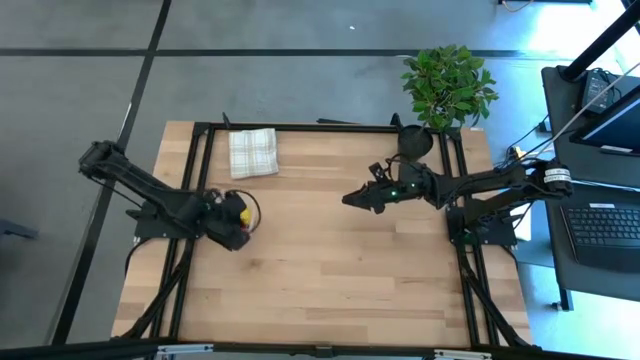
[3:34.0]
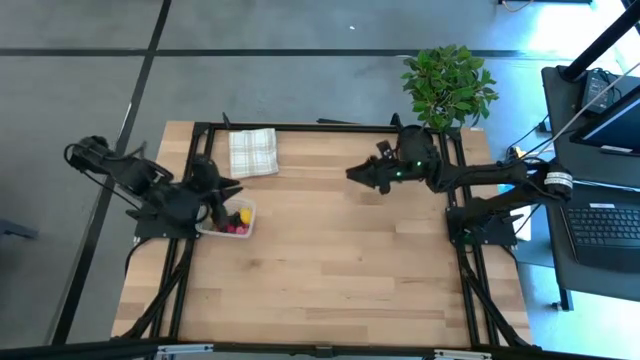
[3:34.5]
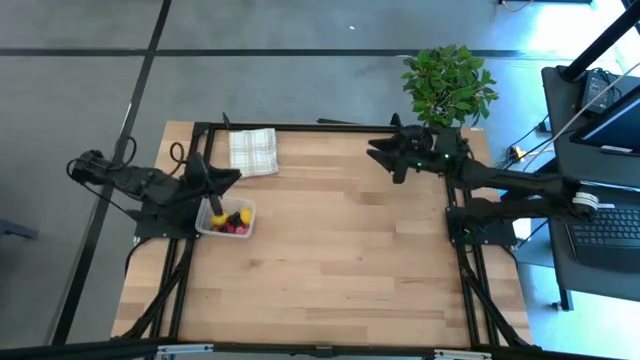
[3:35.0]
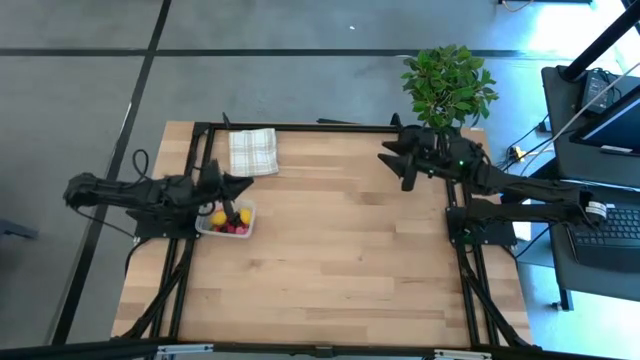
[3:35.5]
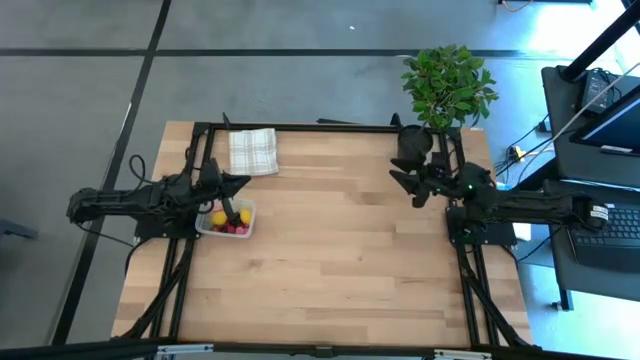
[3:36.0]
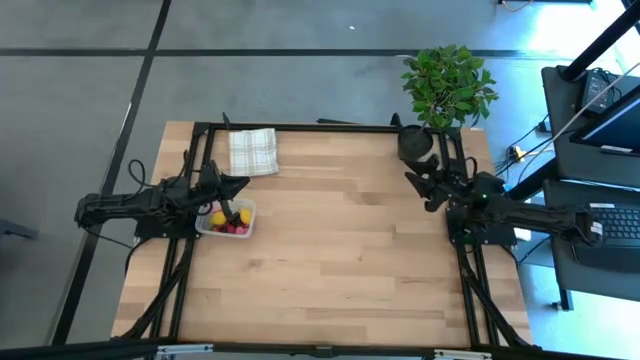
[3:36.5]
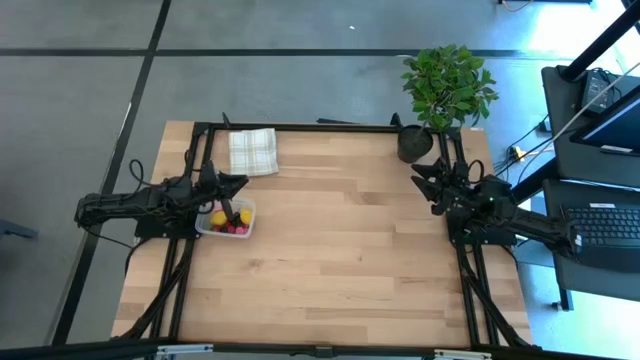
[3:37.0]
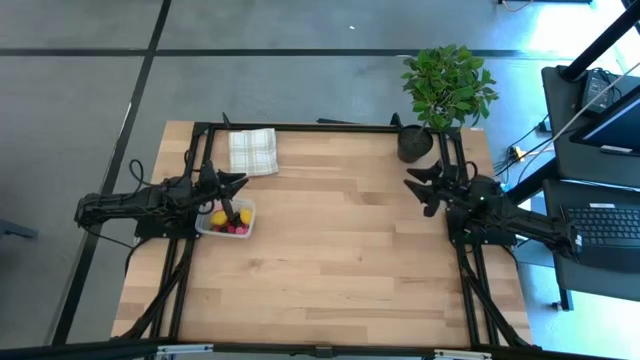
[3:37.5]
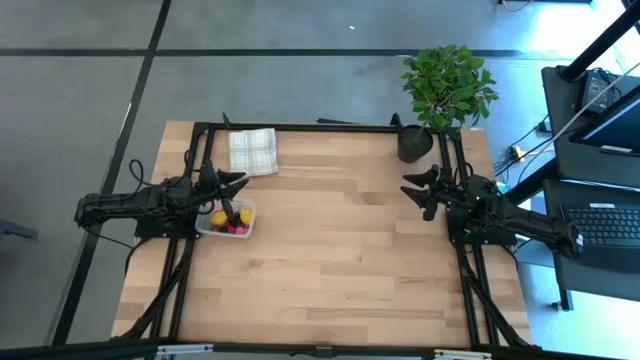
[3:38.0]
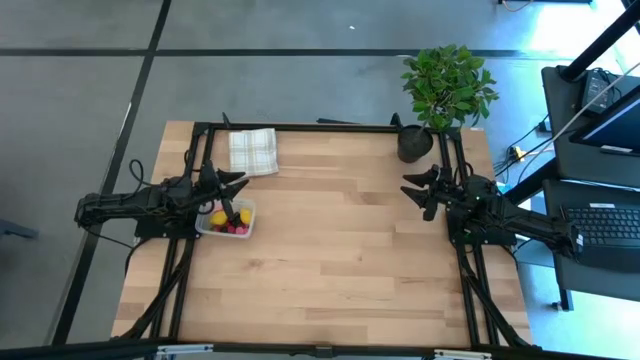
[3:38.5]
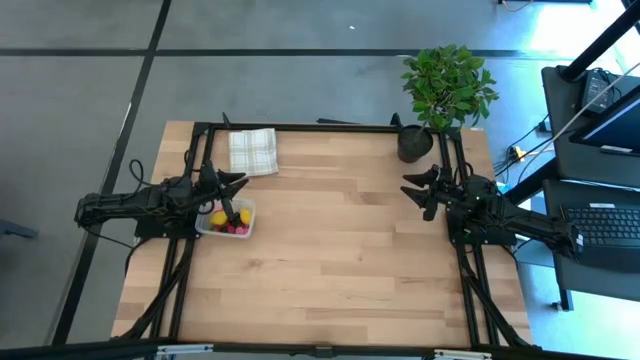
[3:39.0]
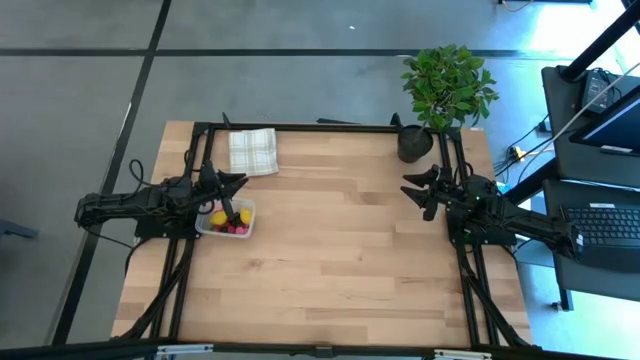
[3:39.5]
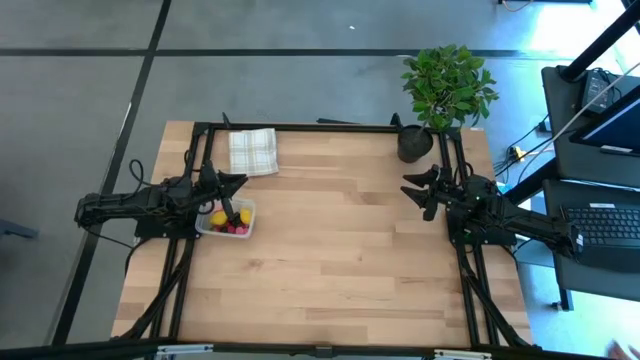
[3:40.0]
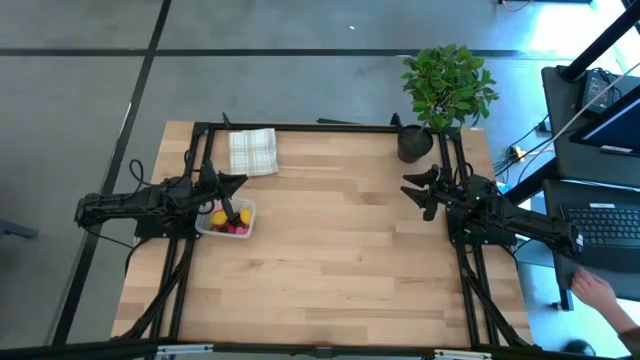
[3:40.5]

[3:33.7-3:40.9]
Task: Pick and placing Produce into tupperware
Return to Home Position

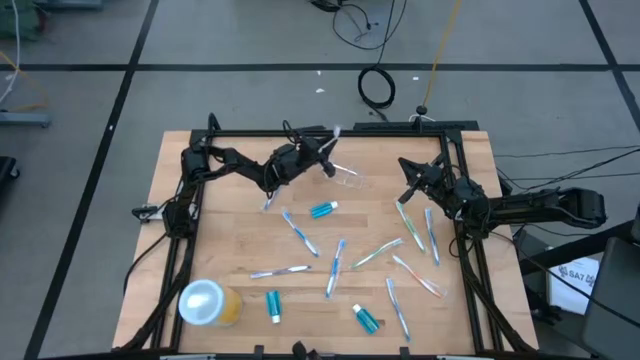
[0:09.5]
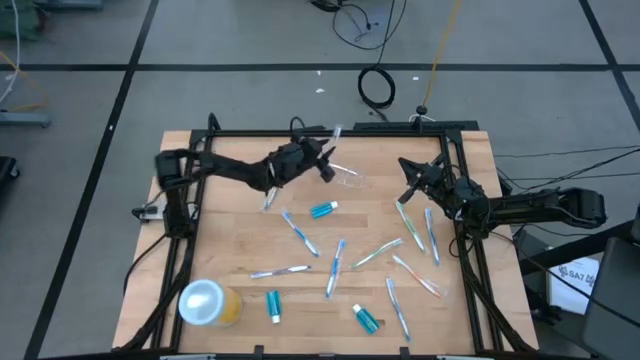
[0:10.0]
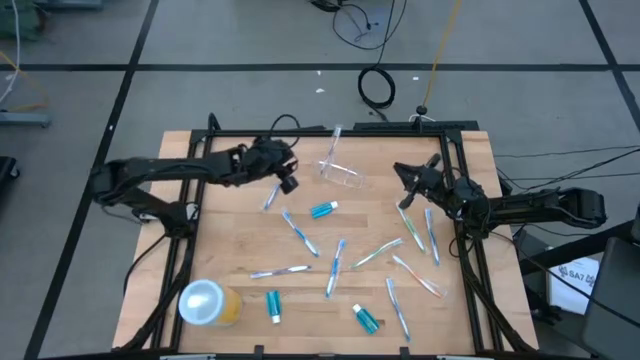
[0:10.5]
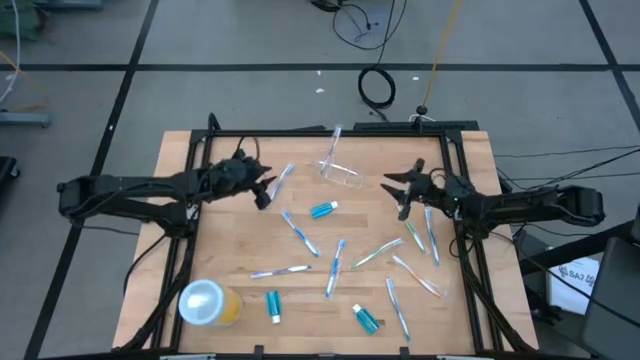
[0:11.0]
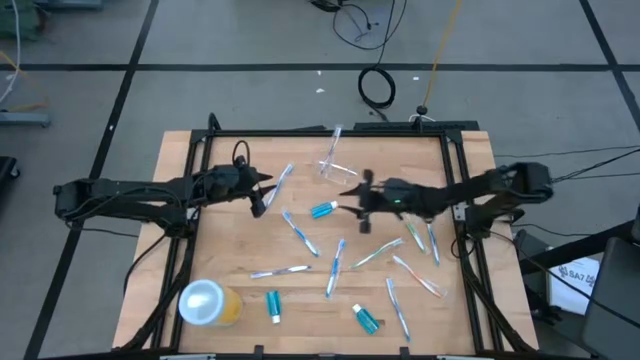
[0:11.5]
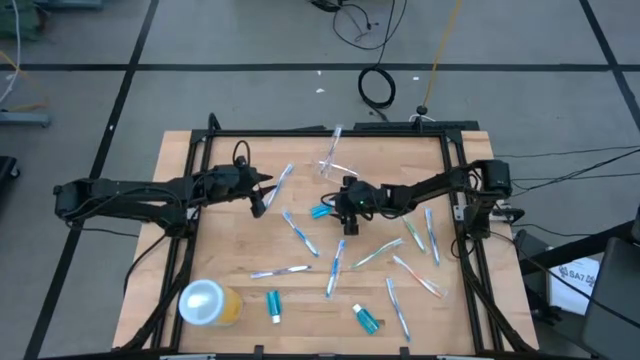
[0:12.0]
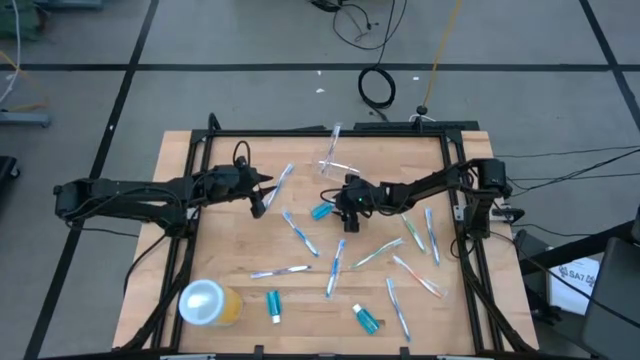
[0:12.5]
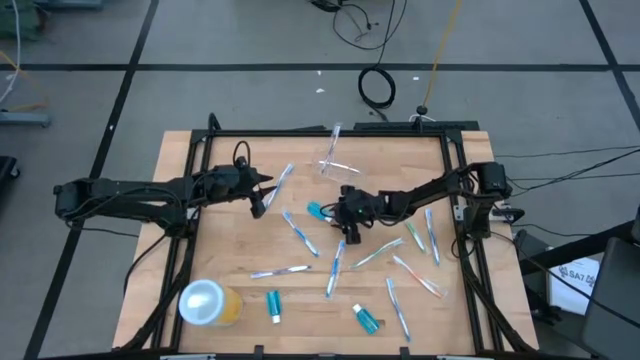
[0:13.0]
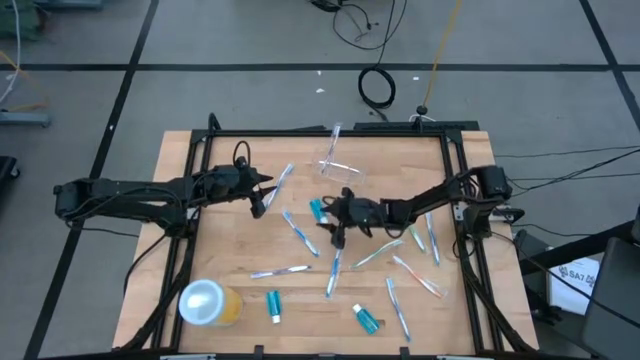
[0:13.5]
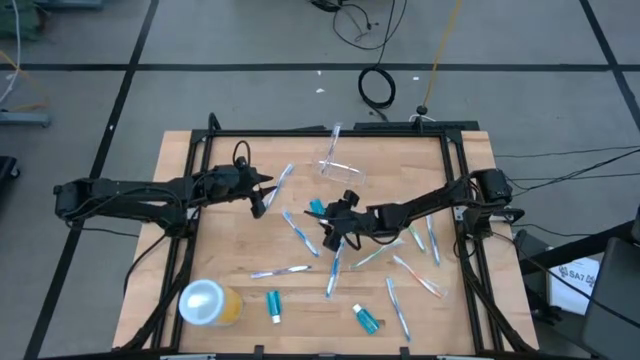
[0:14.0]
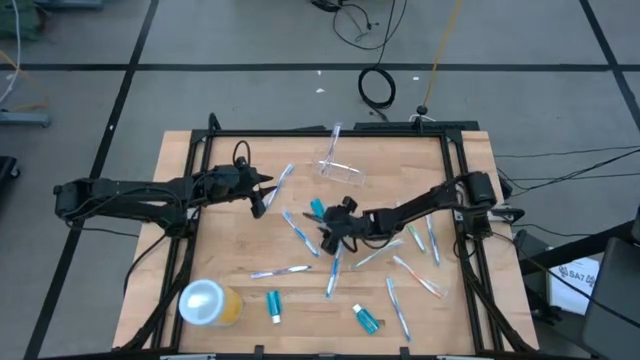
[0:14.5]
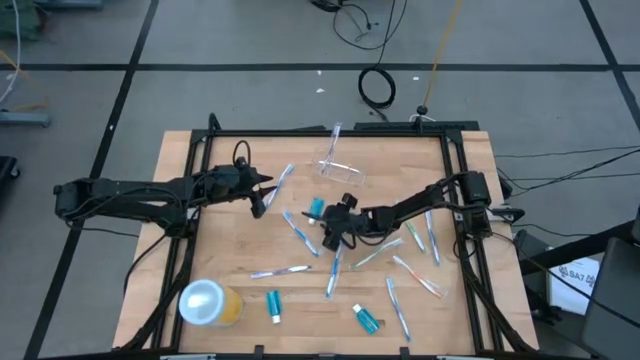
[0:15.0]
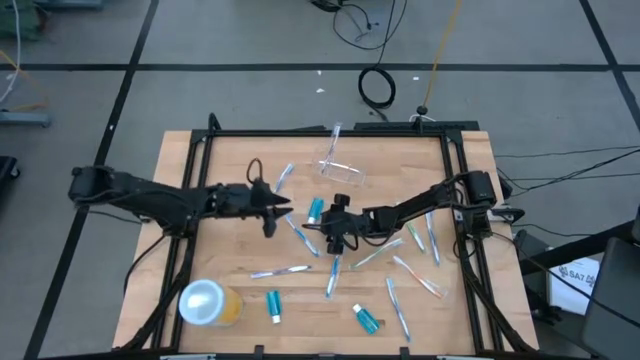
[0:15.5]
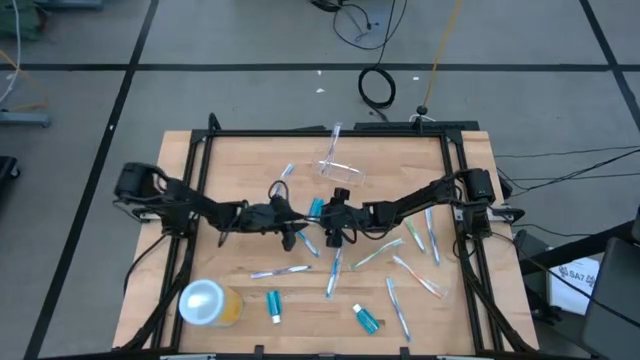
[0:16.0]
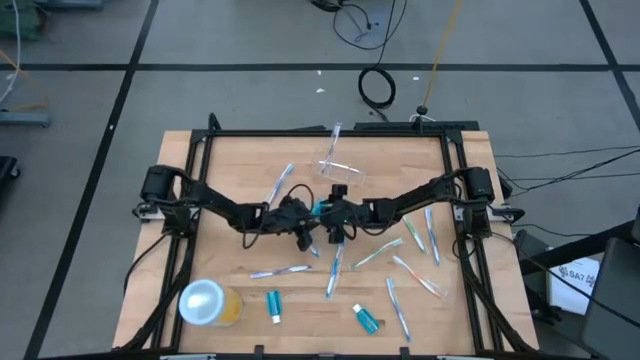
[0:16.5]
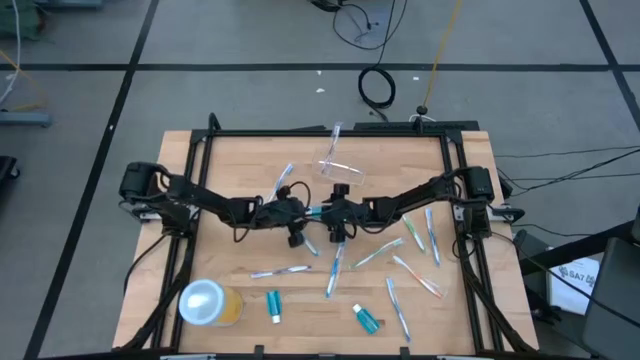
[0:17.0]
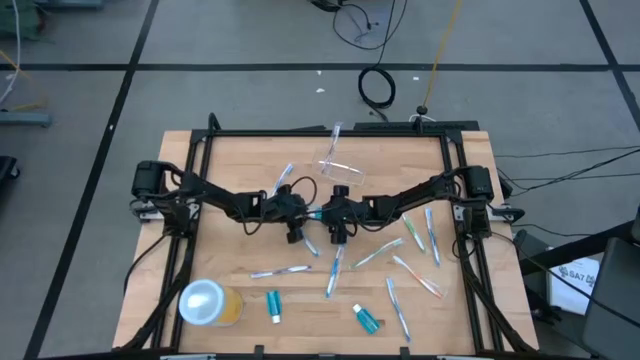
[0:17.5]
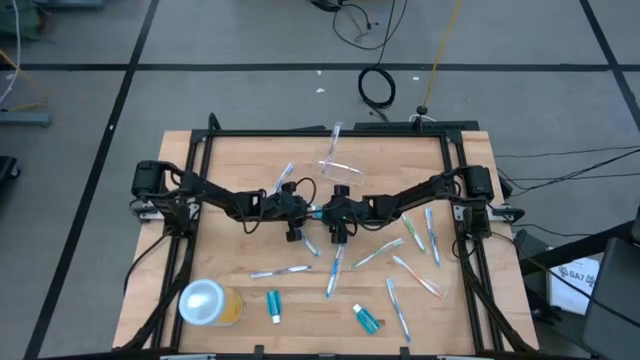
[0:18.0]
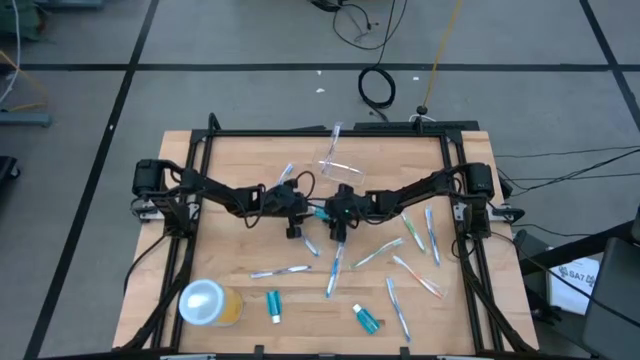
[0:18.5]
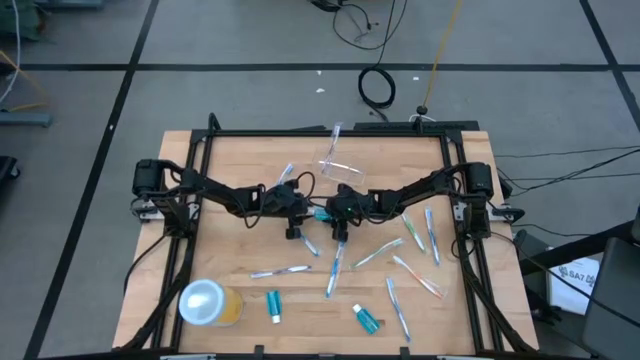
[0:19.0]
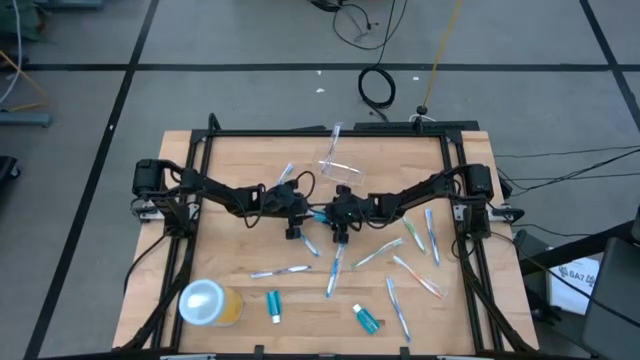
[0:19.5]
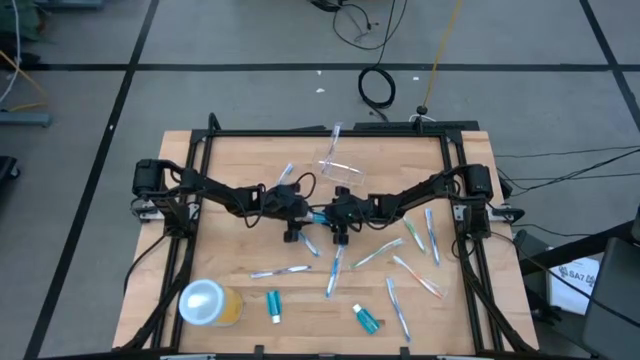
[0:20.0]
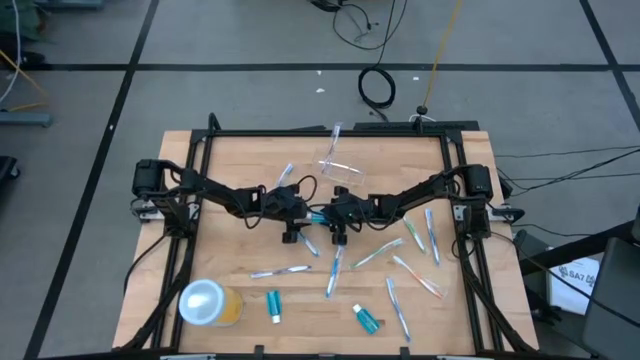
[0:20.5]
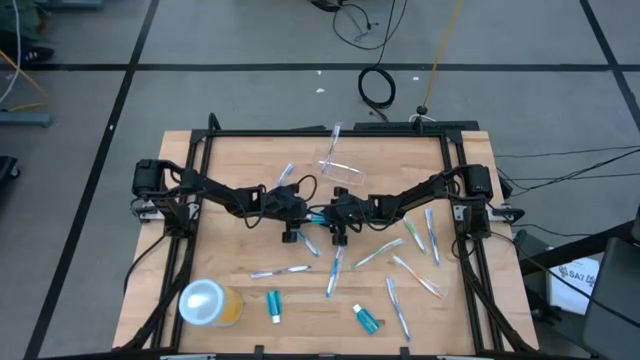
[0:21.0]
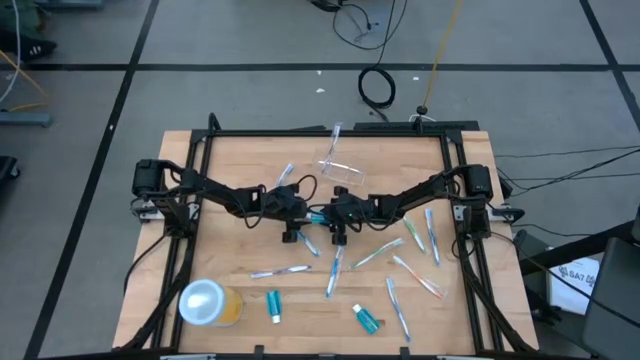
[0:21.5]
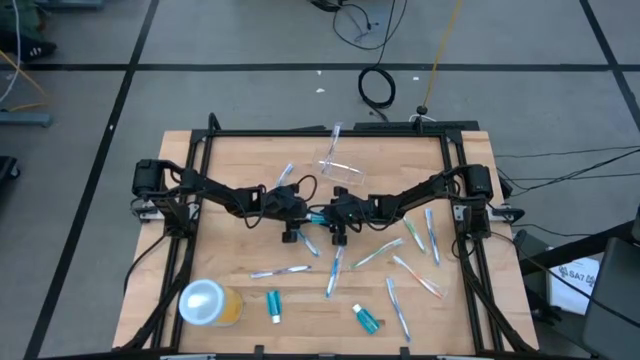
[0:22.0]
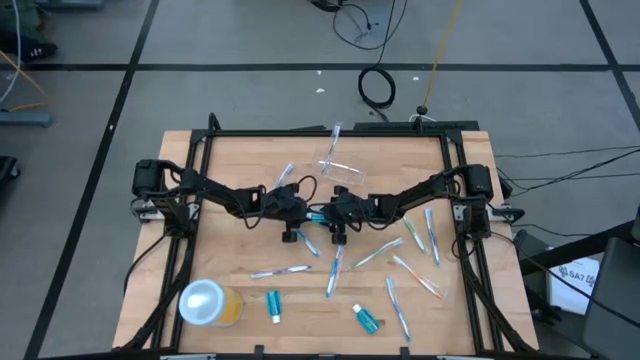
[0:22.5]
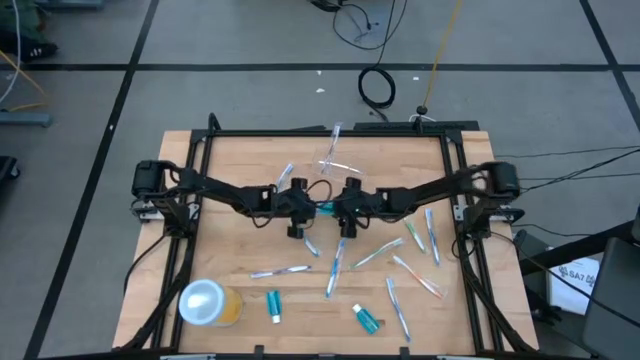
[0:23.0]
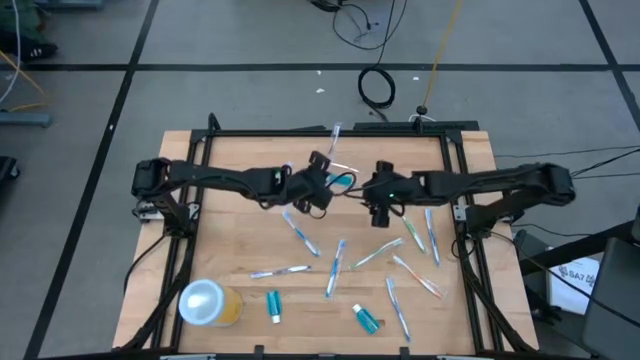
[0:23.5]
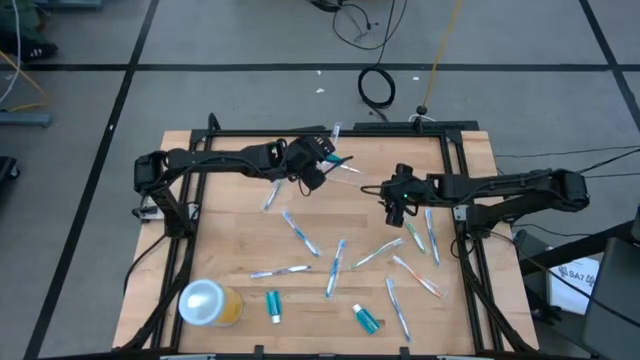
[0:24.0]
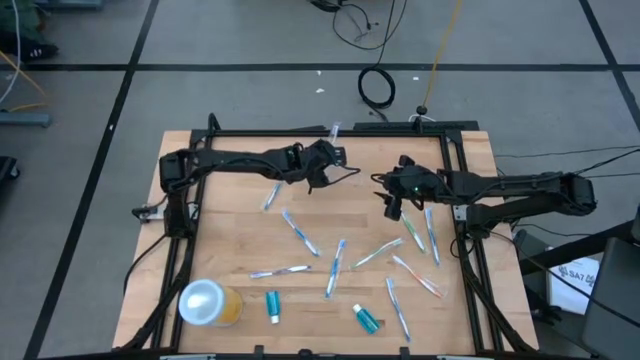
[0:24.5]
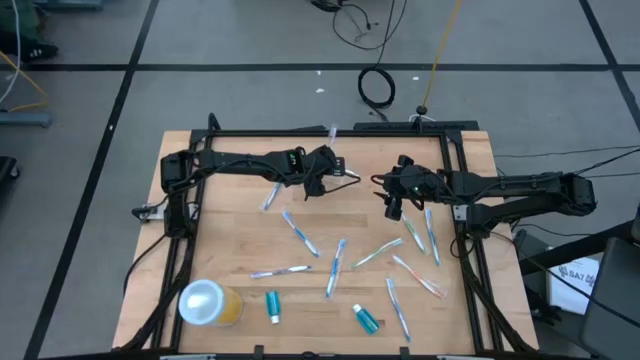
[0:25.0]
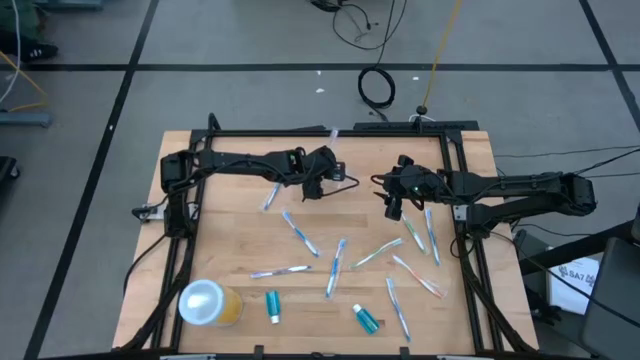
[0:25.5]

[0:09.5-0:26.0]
Task: Pick & Place toothbrushing station
Put the top blue mouthwash into the transparent organizer
